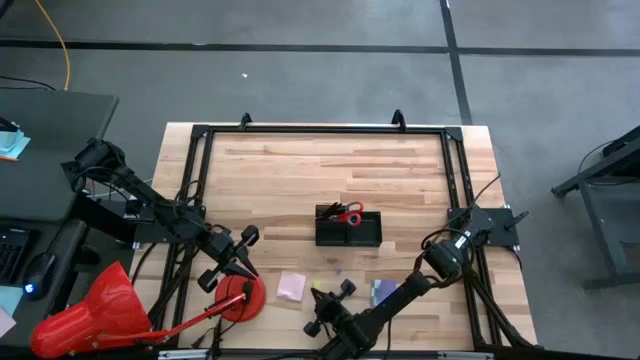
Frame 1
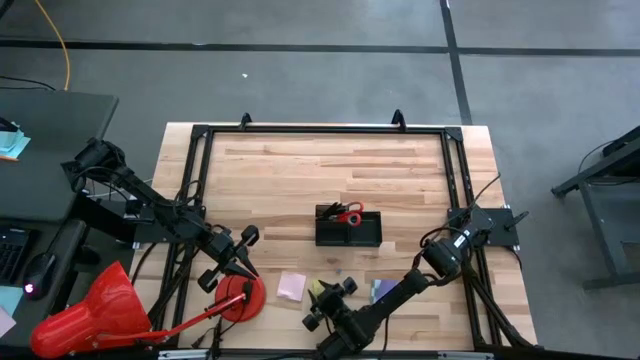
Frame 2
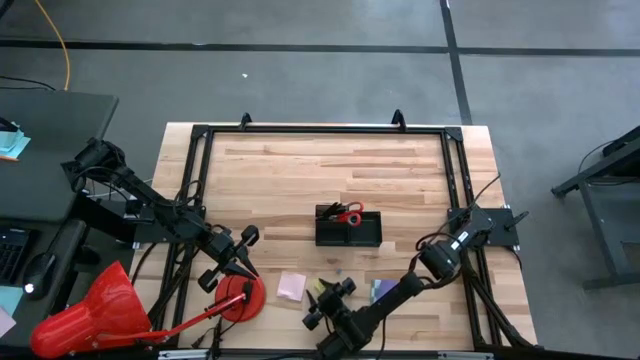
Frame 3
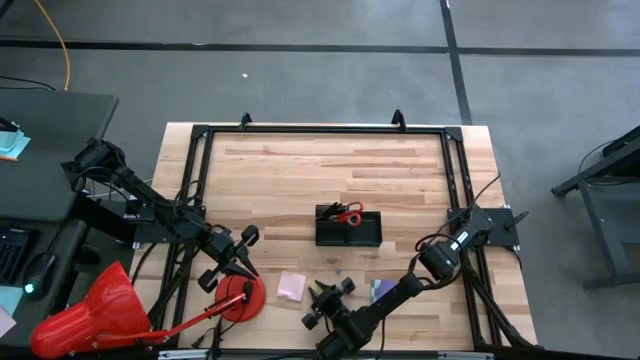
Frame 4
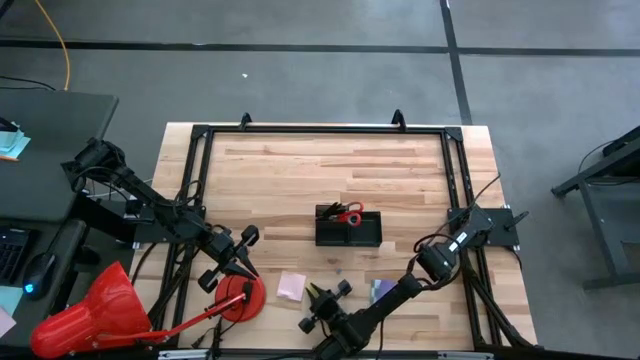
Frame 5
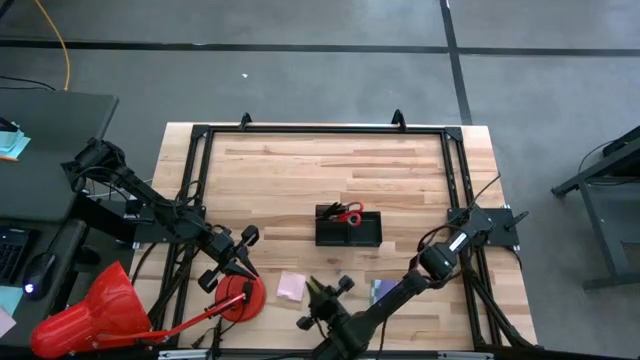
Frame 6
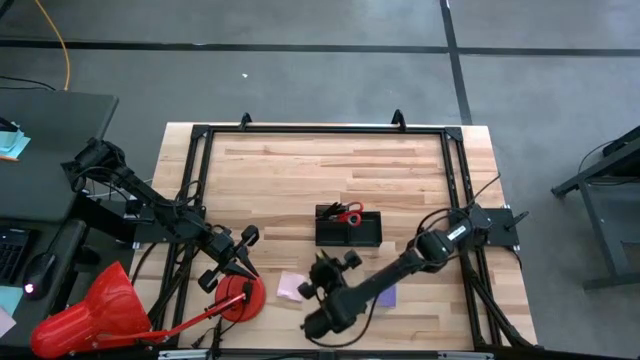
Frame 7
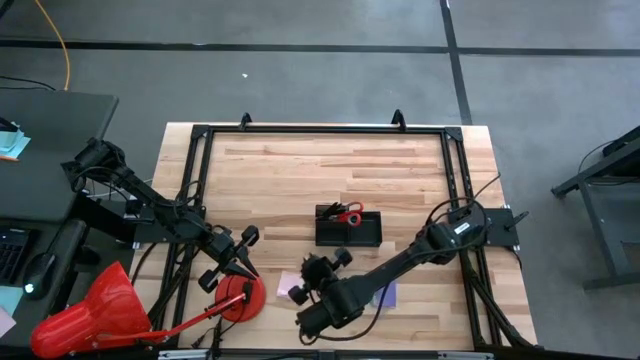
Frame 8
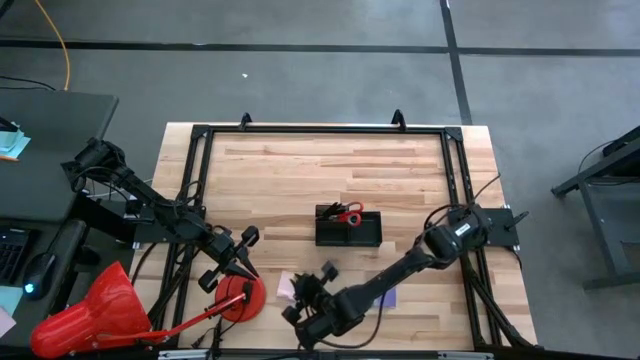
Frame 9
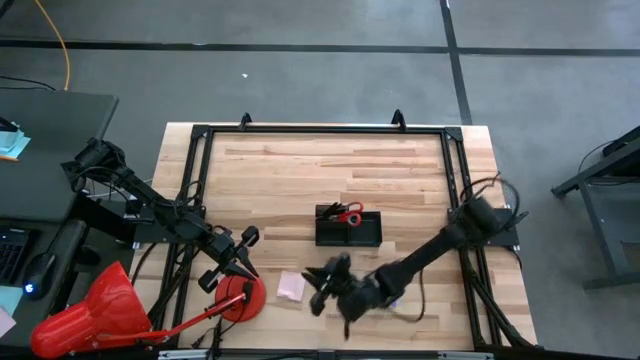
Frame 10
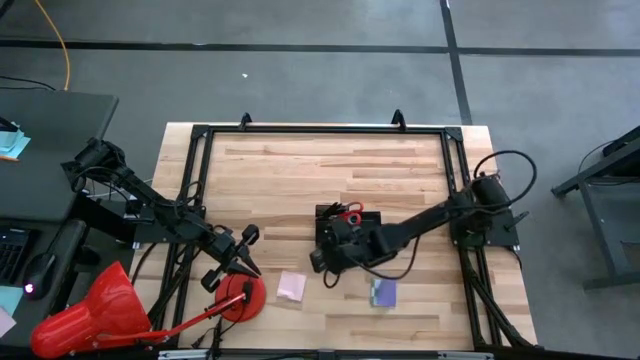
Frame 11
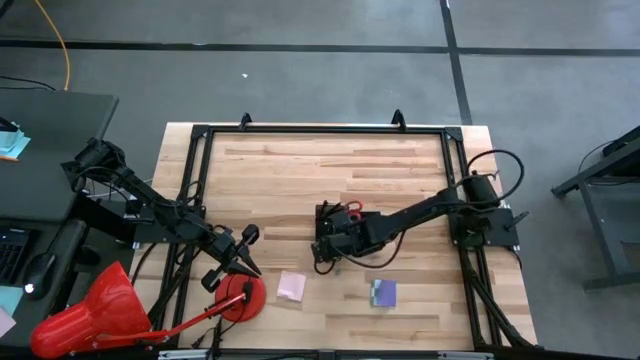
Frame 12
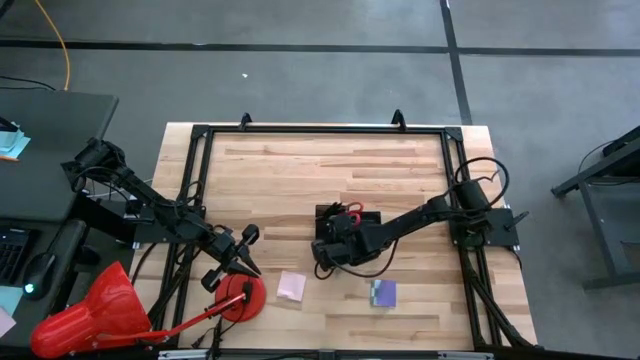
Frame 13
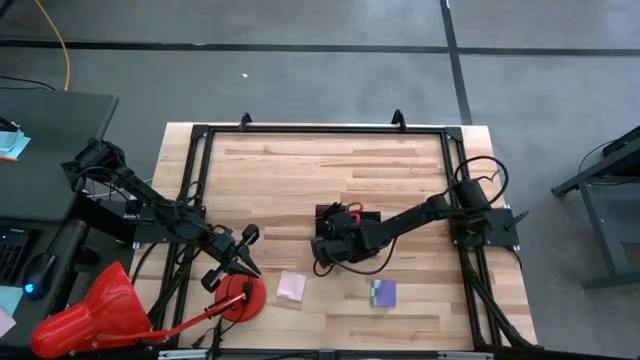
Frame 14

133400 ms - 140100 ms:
Task: Pick and place office supplies into organizer
Put the yellow eraser into the black desk organizer

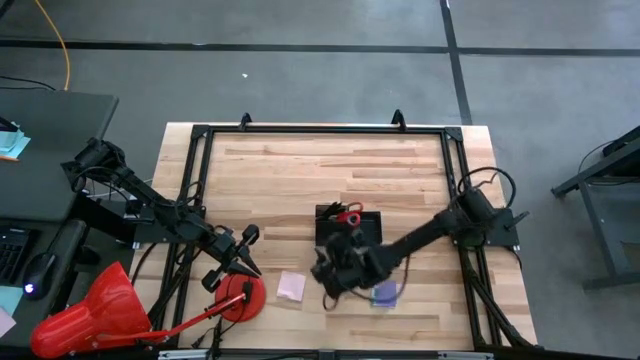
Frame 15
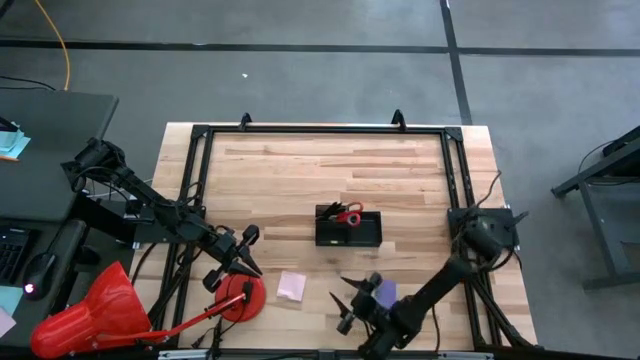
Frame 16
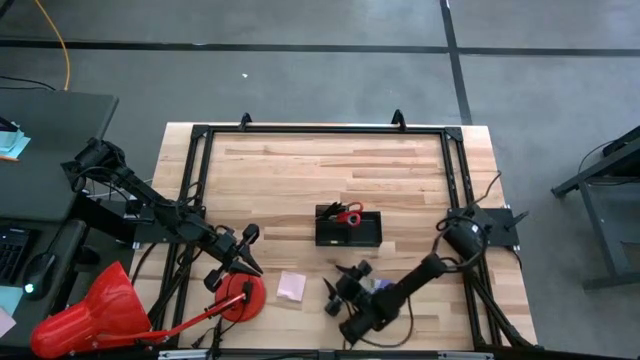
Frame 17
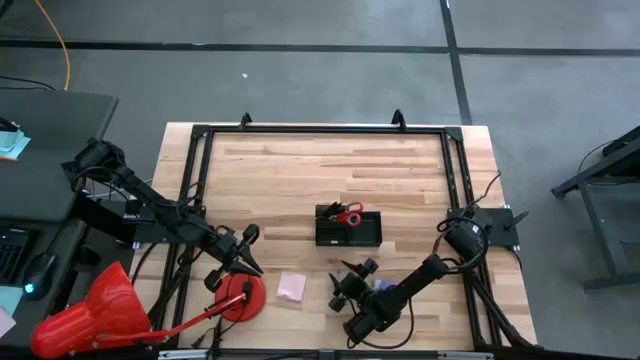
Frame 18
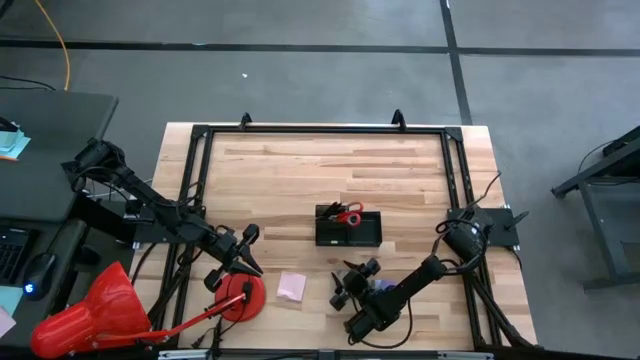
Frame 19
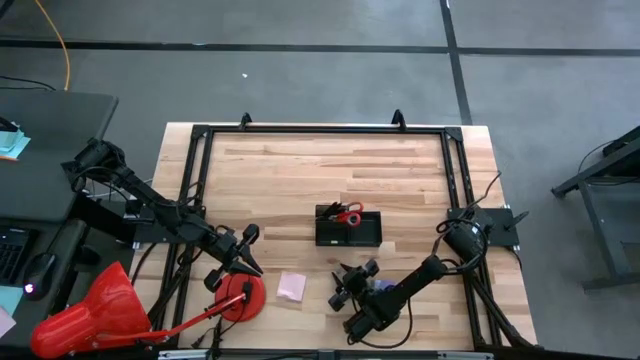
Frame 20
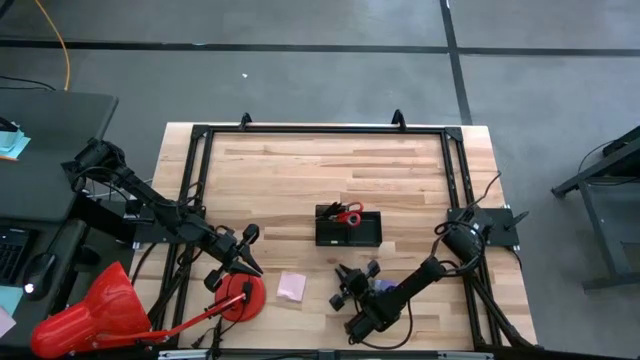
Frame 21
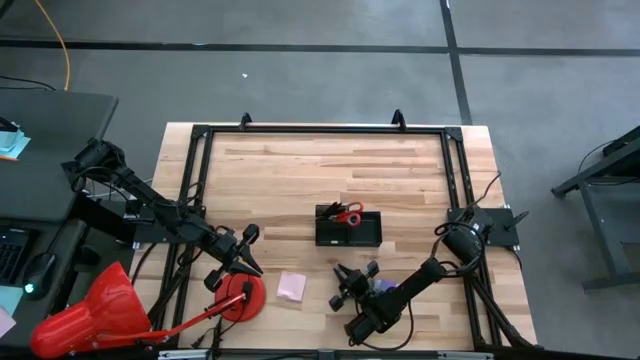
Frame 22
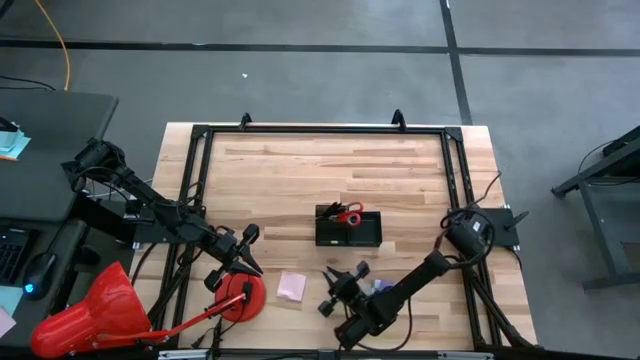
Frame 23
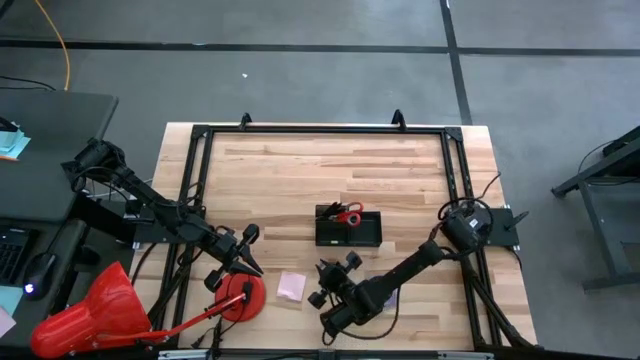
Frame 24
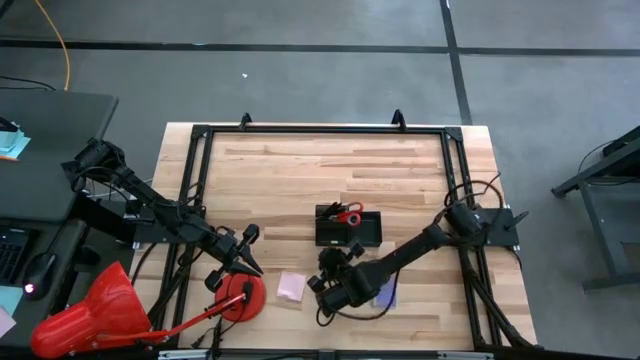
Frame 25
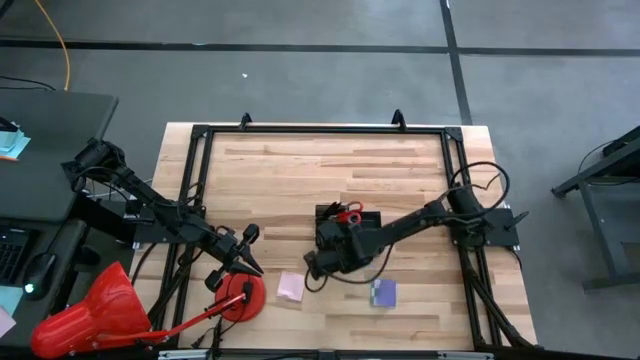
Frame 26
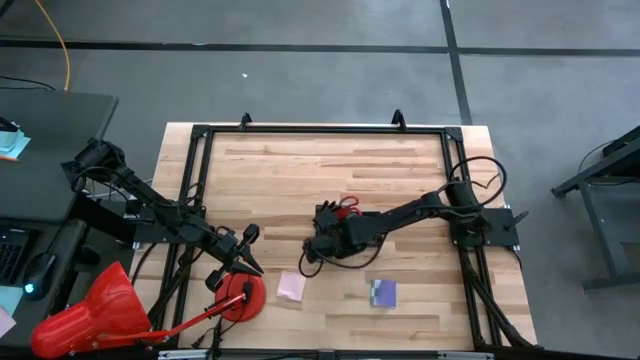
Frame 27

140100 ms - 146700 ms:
Put the blue binder clip into the black desk organizer

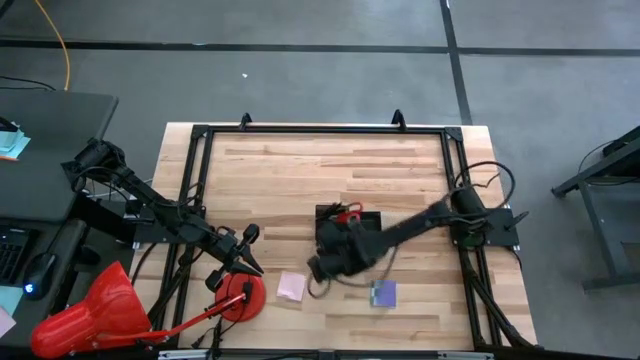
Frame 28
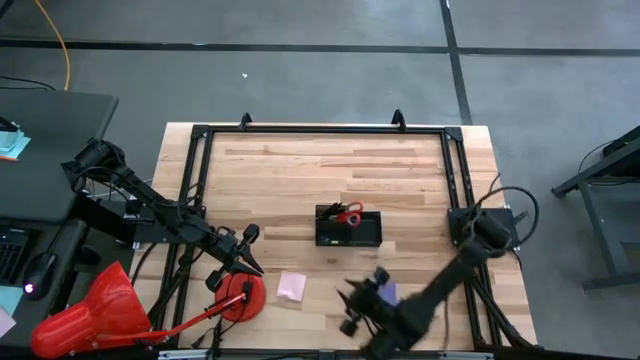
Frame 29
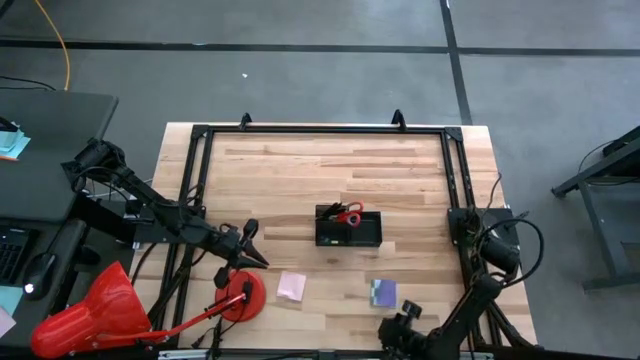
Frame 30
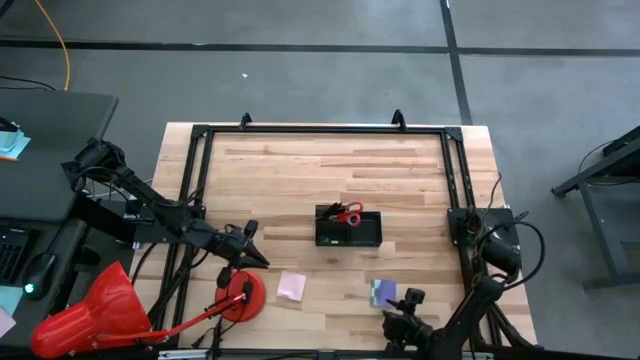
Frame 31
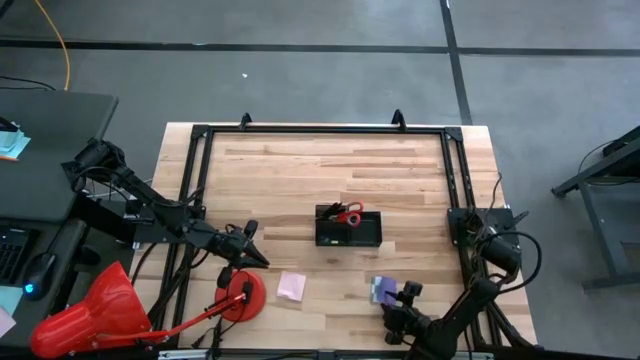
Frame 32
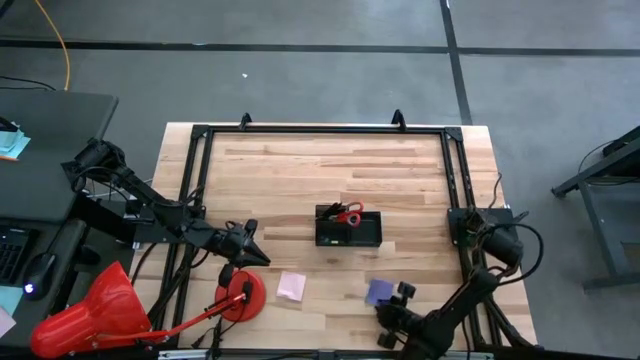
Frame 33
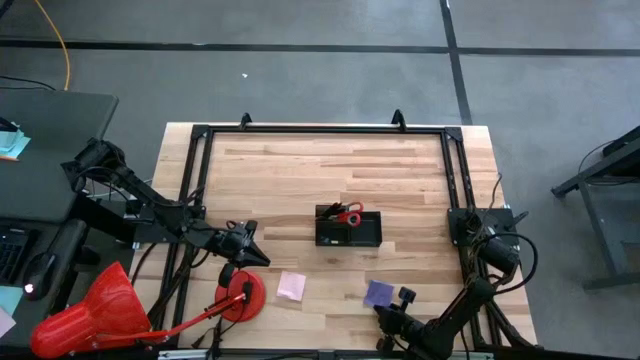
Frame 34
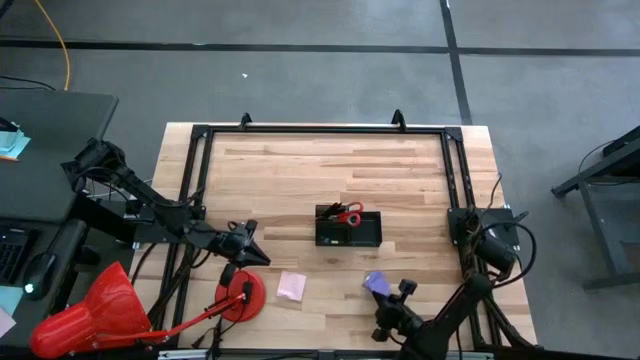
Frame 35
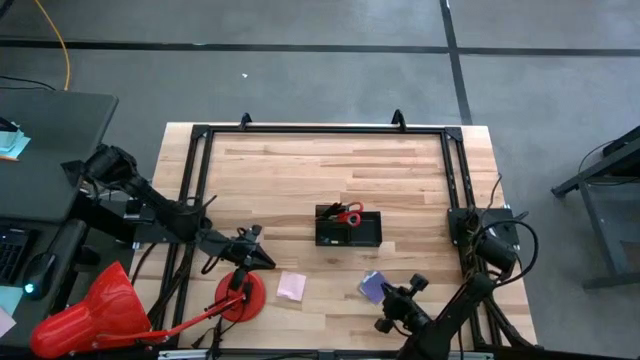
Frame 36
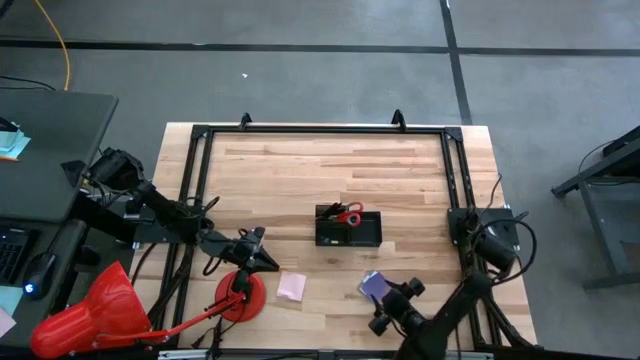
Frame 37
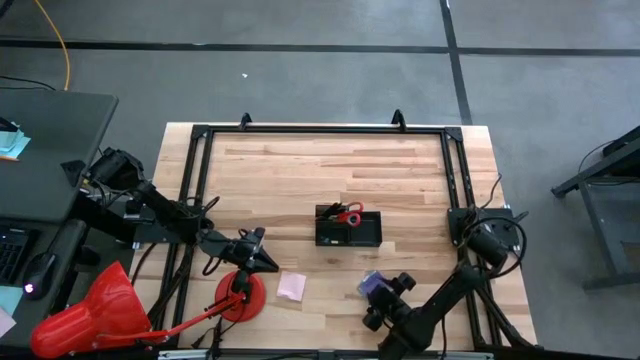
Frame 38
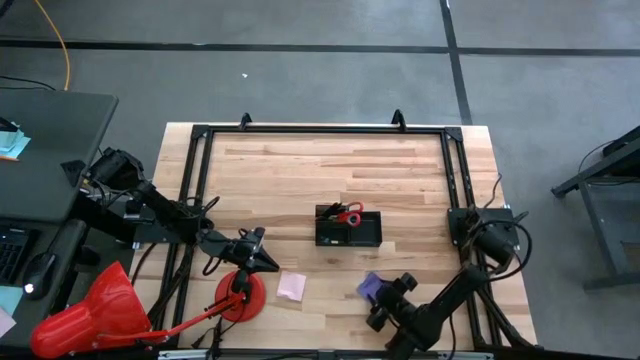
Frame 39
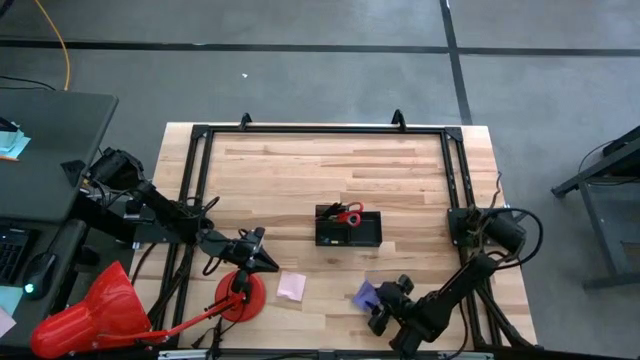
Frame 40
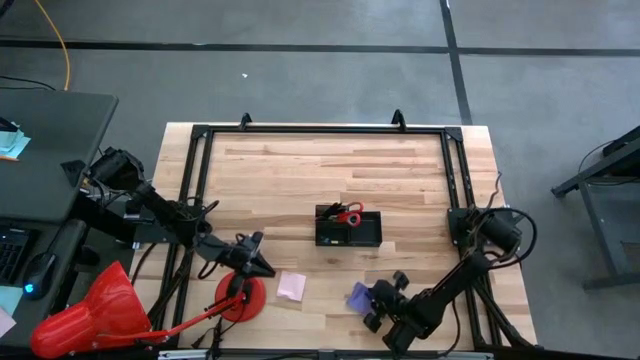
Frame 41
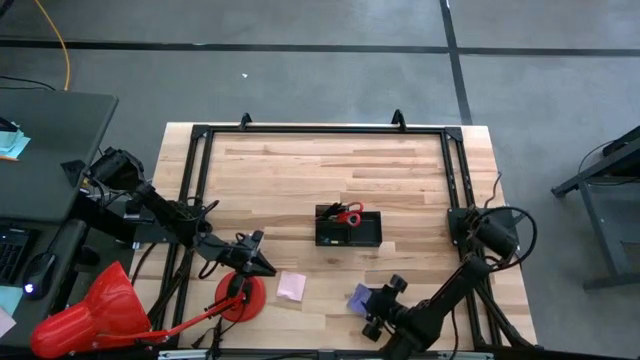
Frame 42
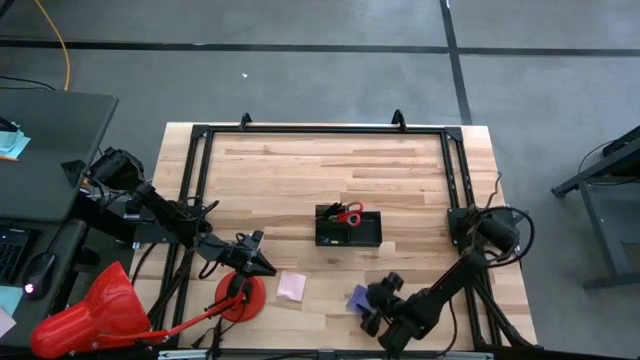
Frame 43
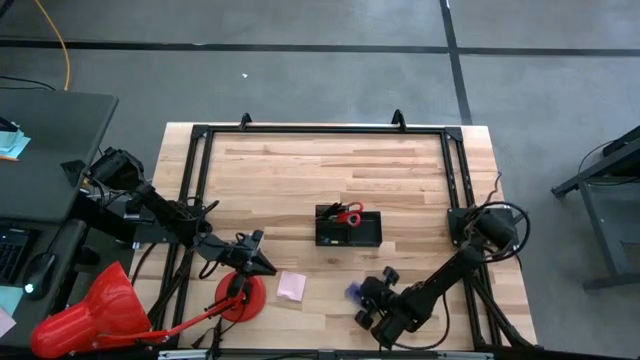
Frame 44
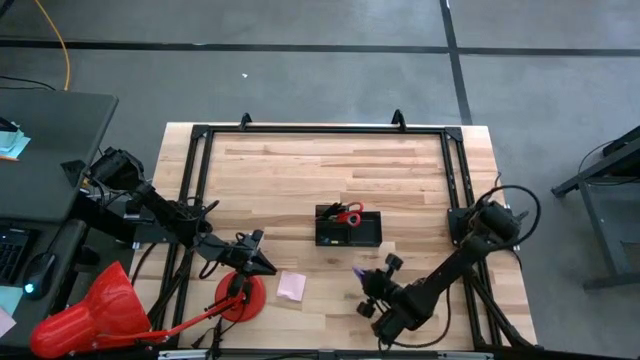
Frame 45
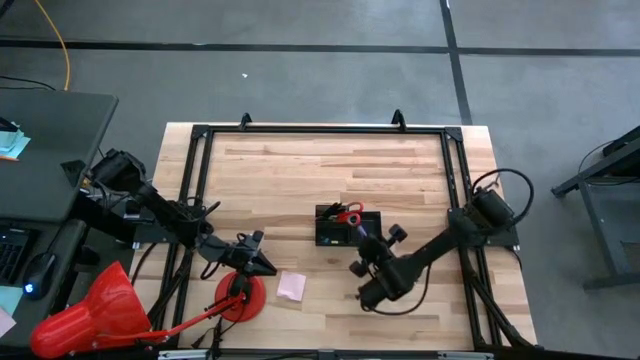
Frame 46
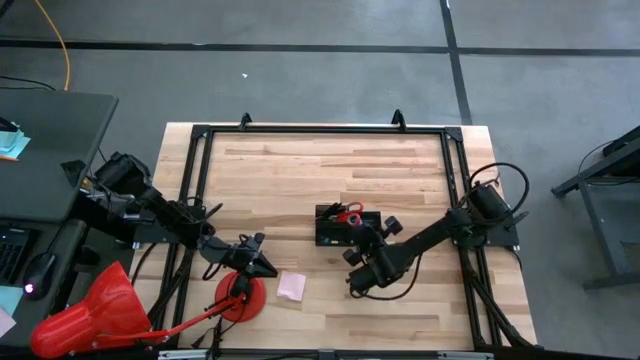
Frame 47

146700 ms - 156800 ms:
Put the violet sticky note into the black desk organizer
